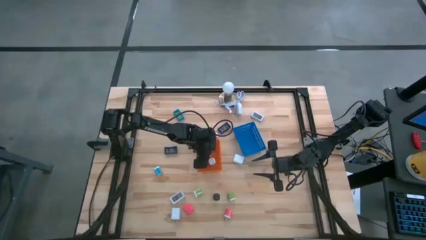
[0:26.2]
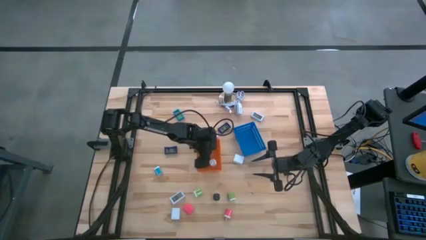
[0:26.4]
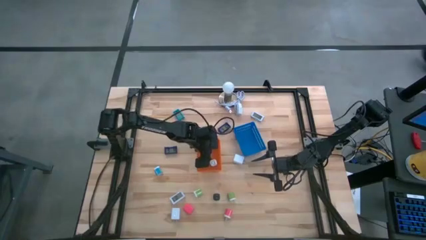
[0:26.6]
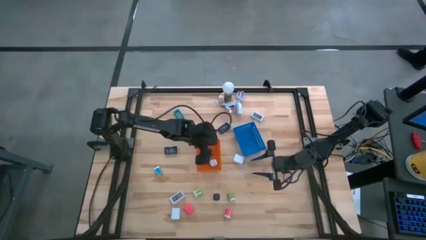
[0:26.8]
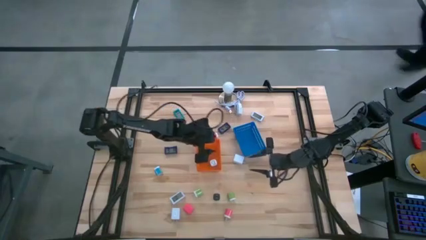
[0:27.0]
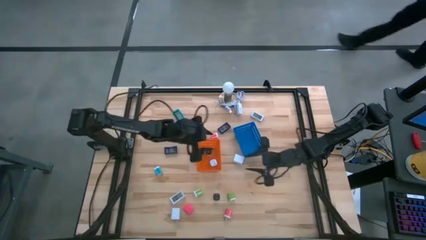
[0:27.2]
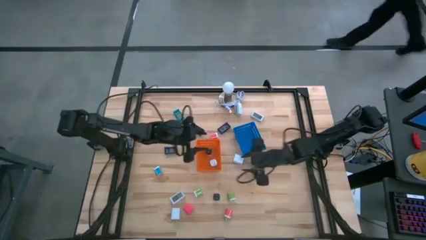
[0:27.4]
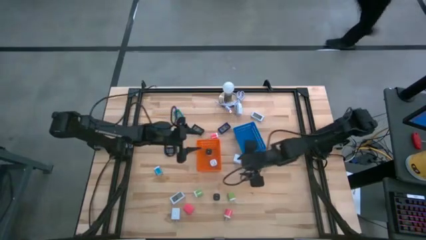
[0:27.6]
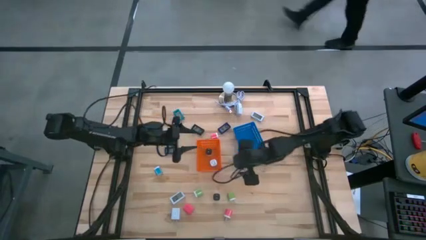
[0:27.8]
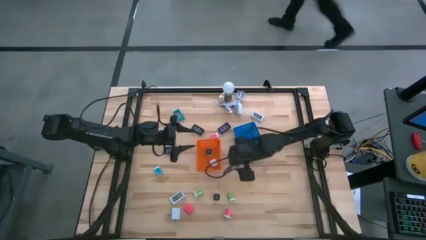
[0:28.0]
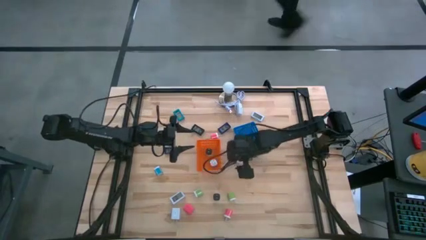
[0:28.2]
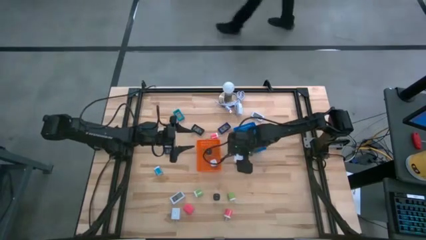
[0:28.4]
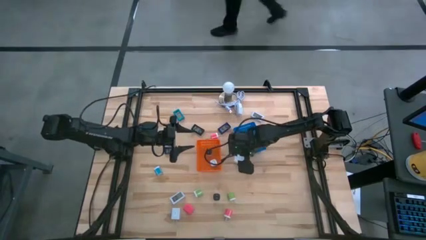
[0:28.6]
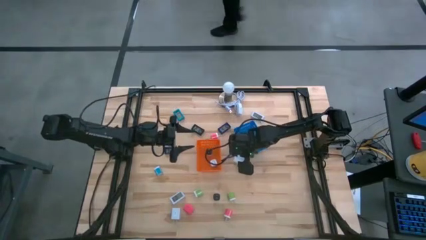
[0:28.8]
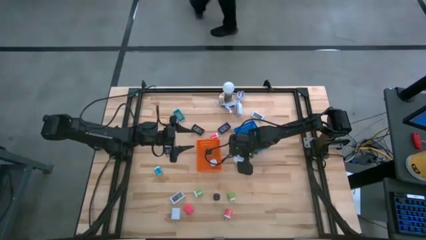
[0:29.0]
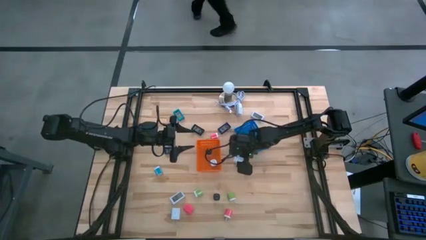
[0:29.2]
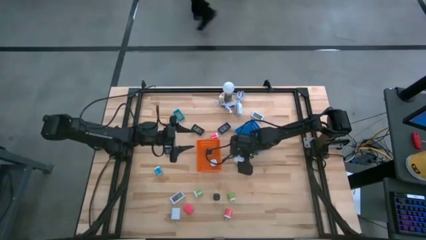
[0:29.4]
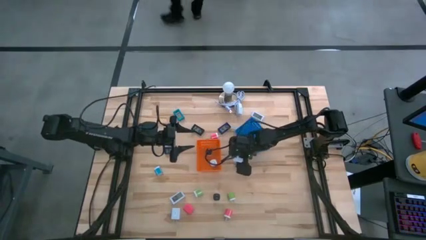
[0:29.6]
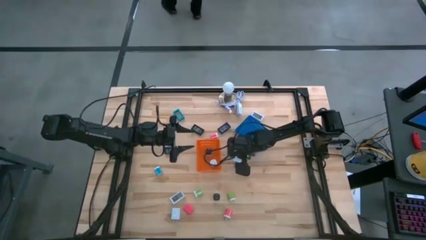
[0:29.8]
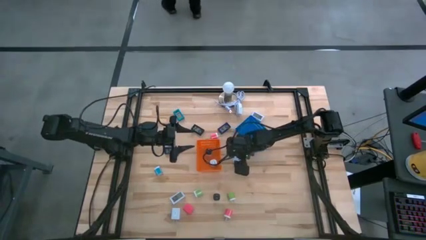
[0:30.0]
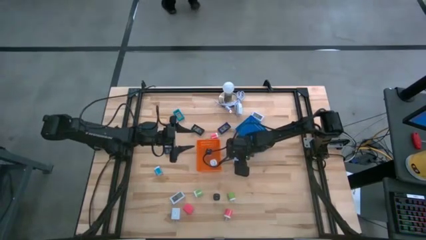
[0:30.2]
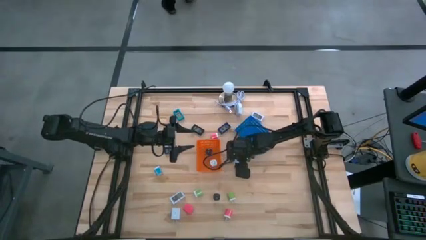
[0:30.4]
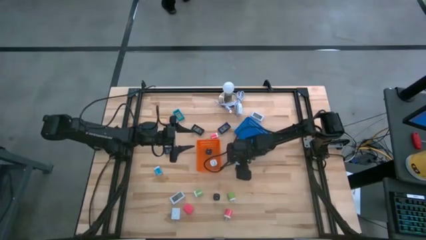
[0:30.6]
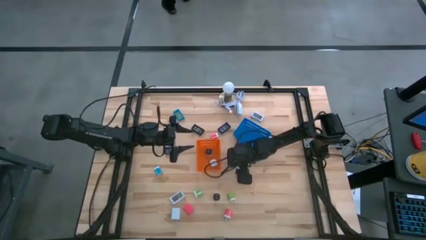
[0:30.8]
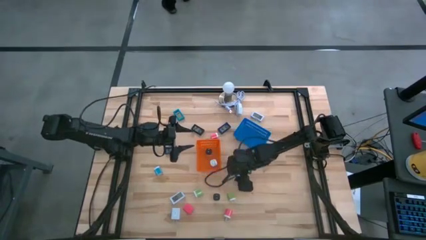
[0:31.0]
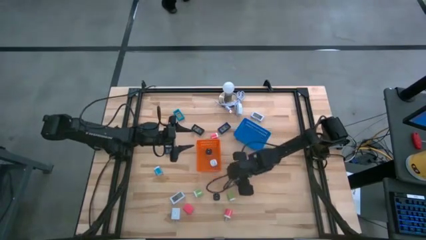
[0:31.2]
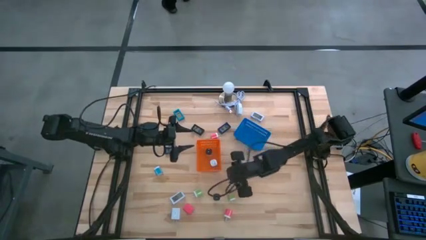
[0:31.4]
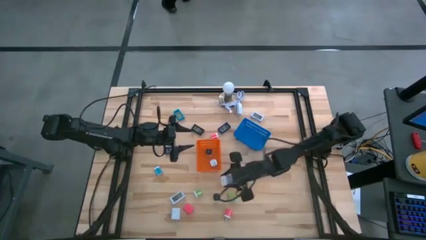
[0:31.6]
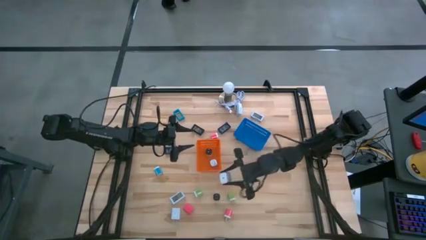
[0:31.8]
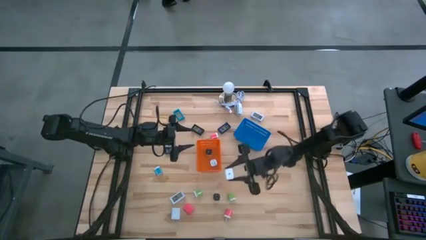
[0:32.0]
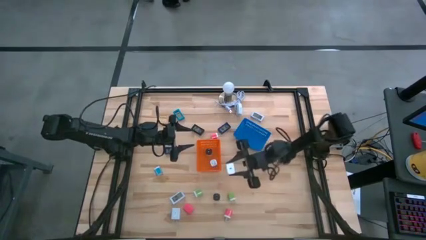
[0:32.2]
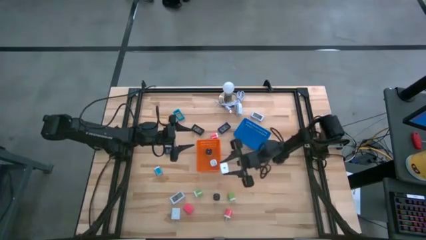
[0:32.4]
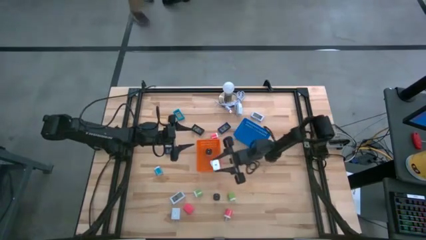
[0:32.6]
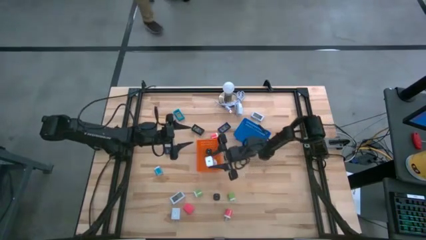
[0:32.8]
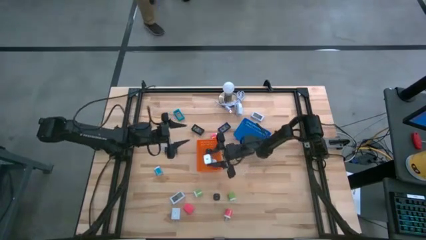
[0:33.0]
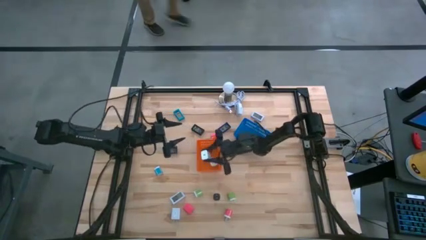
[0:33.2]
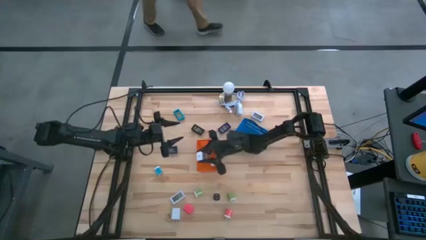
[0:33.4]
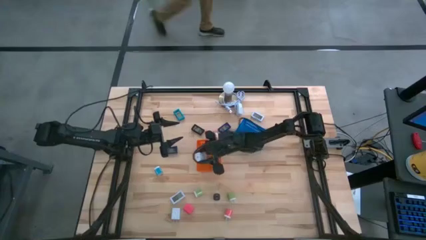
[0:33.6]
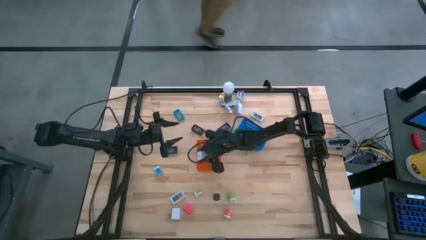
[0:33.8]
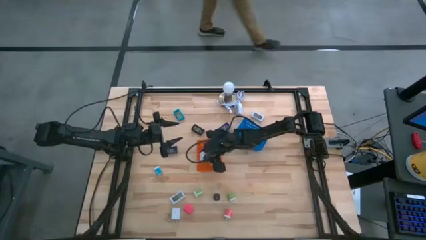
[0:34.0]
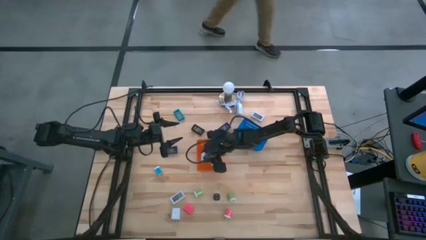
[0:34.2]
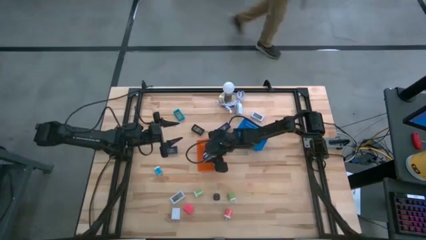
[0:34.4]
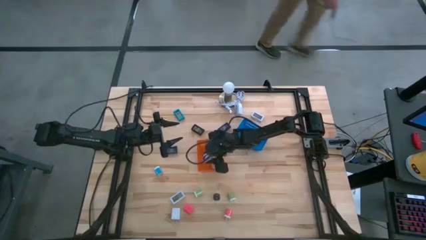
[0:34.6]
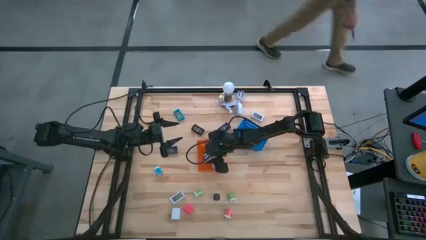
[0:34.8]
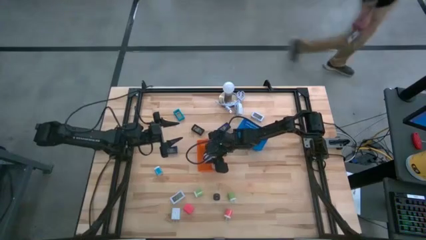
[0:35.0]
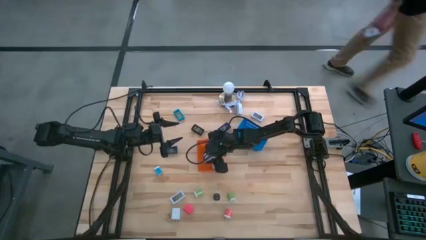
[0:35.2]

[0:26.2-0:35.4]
Task: Pick & Place Office items
Put the right white charger adapter into the orange bin

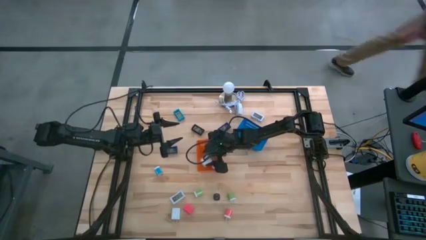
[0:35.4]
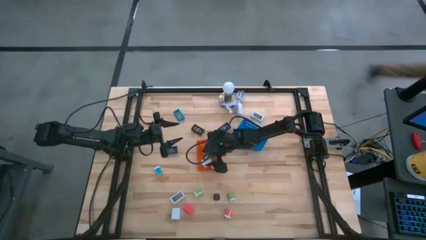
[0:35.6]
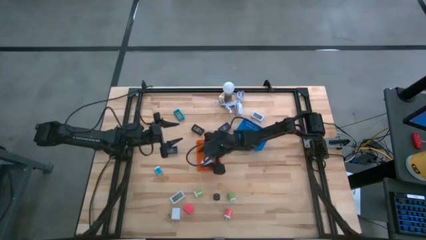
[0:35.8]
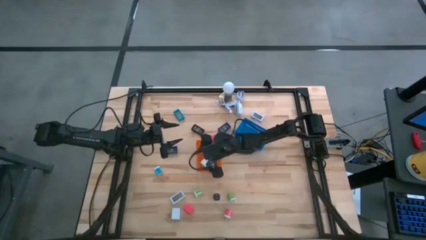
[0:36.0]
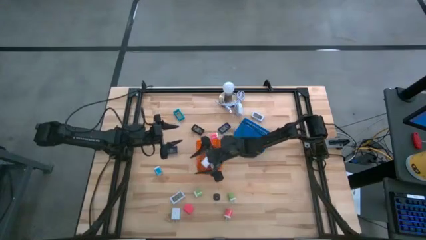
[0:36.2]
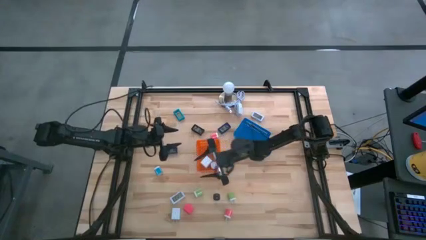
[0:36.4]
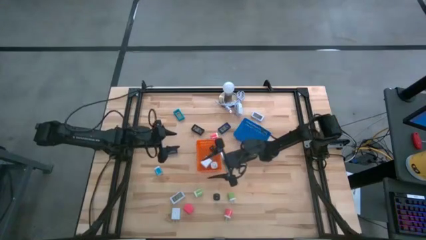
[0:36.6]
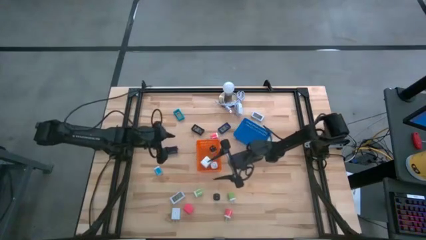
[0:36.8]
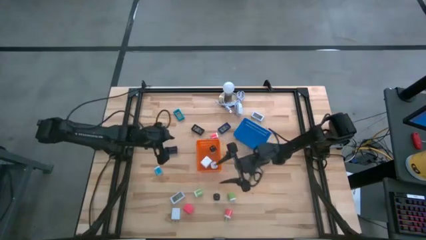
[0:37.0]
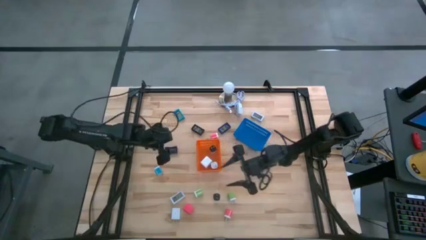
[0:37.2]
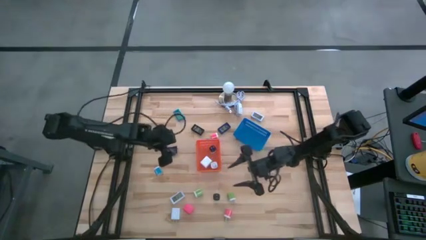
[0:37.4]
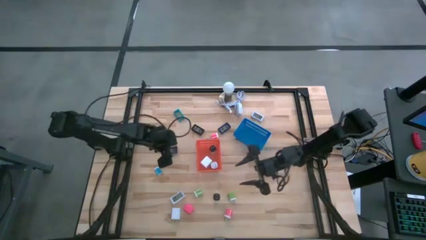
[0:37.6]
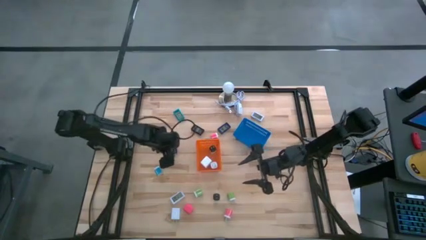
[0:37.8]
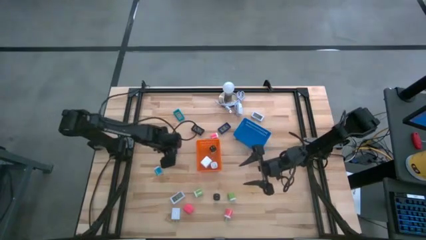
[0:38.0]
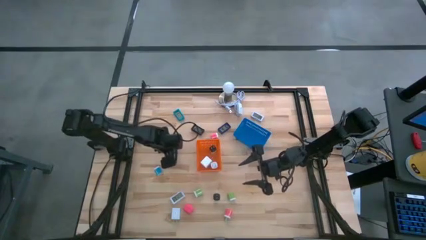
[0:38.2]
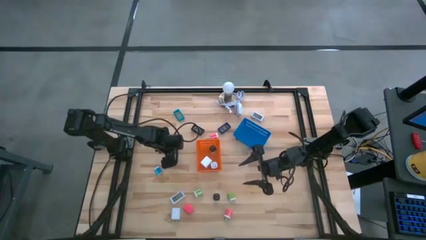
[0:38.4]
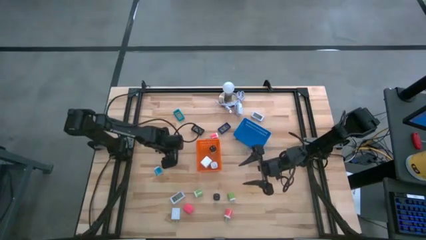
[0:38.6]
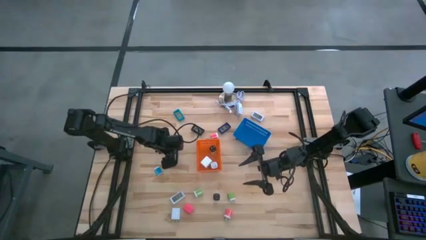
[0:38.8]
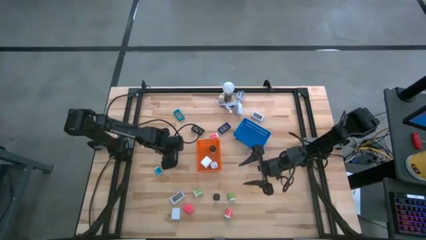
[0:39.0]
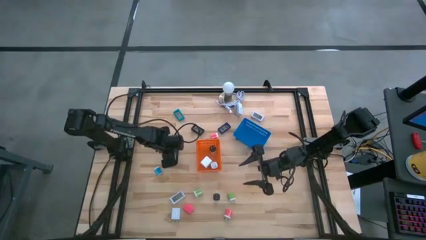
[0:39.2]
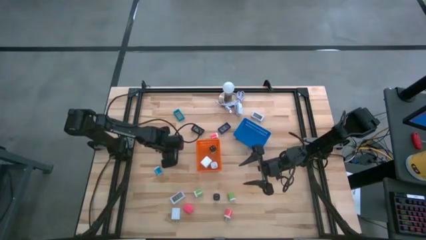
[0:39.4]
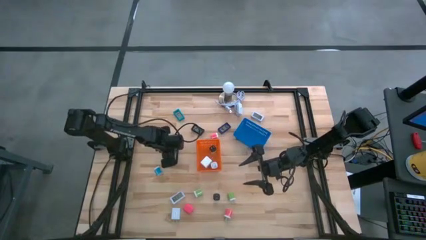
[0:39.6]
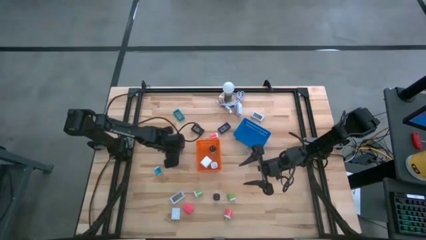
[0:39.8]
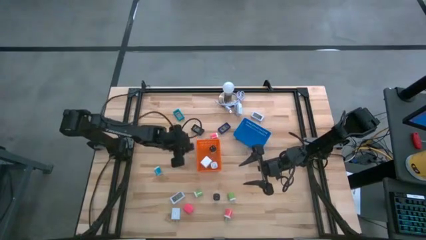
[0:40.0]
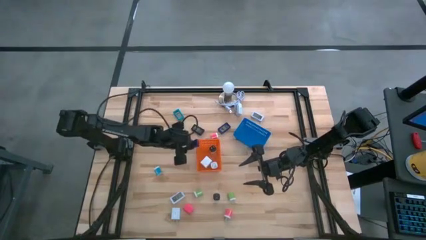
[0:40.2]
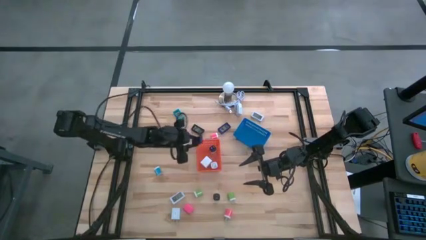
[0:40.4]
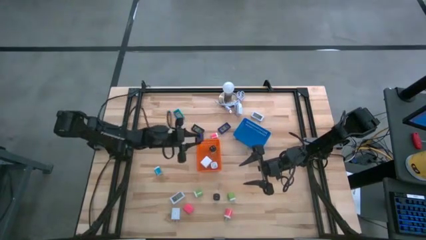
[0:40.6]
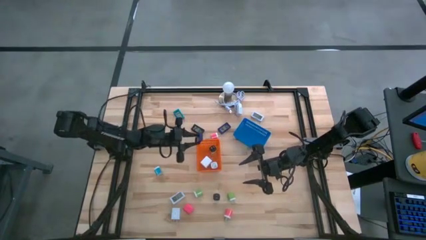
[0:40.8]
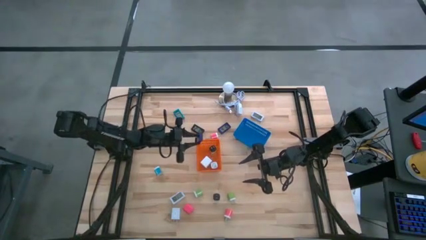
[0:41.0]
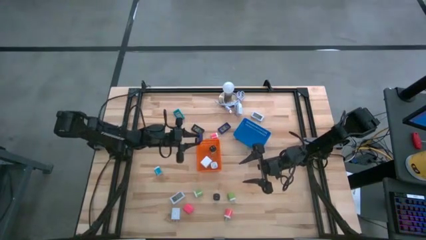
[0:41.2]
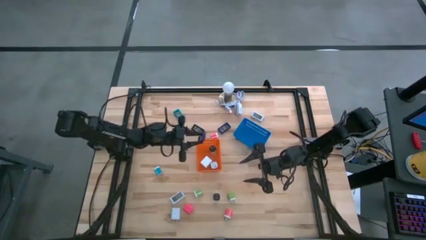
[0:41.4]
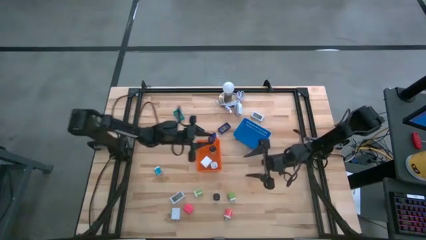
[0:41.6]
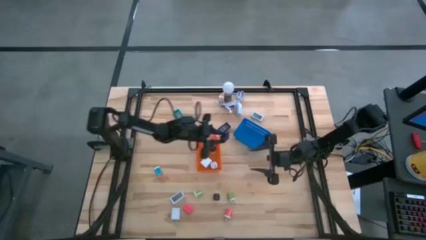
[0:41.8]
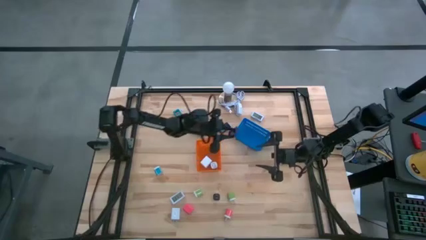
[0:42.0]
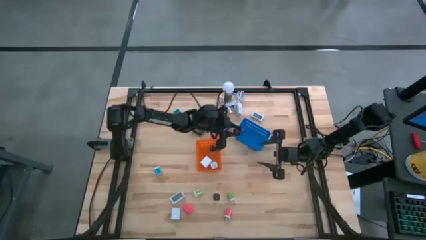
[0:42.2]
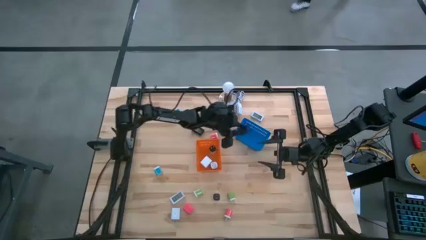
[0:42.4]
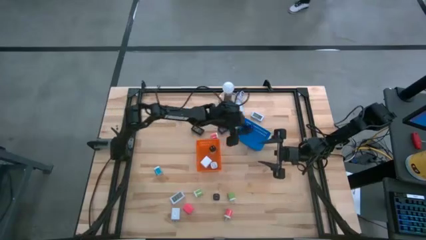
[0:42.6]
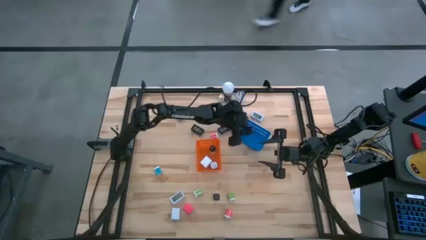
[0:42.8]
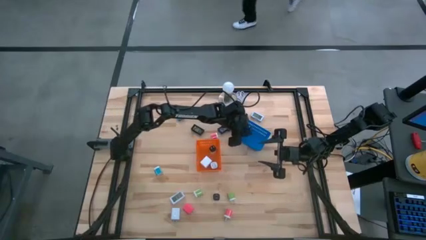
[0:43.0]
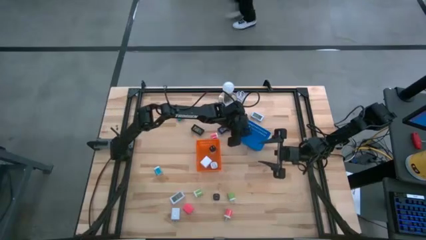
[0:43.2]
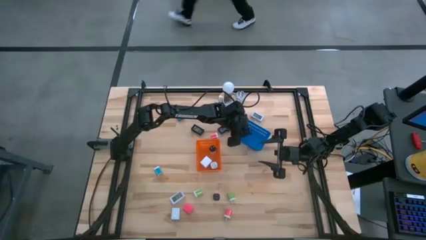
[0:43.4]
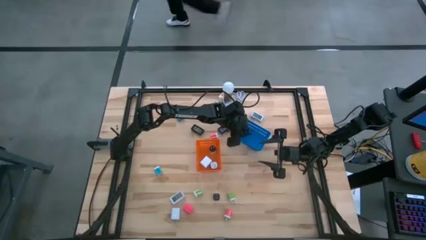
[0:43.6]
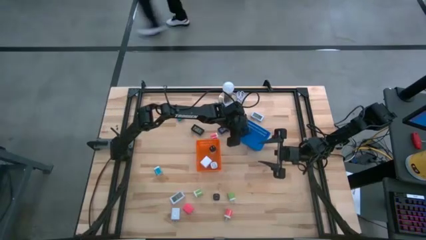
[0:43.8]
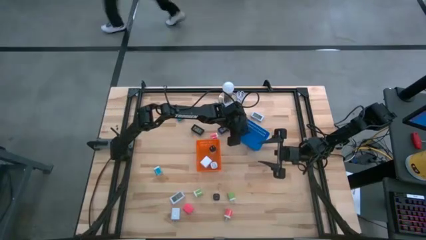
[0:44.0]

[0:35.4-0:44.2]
Put the left blue digital timer into the blue bin
